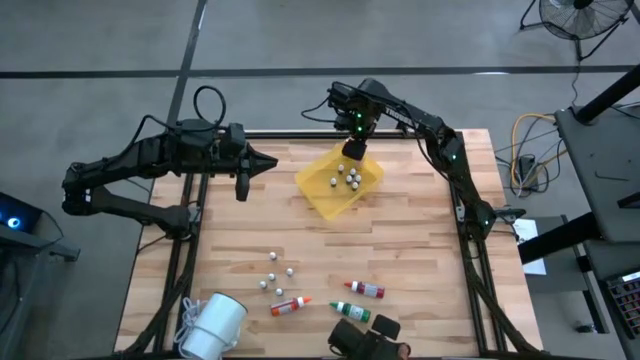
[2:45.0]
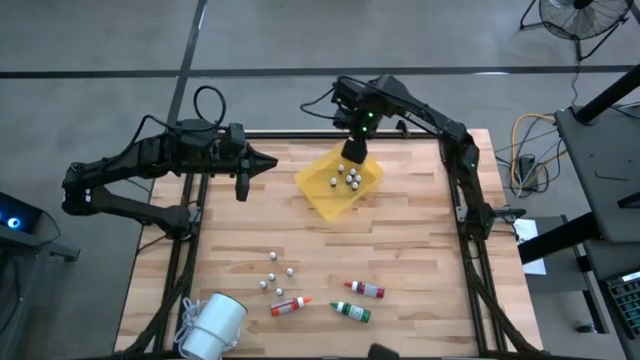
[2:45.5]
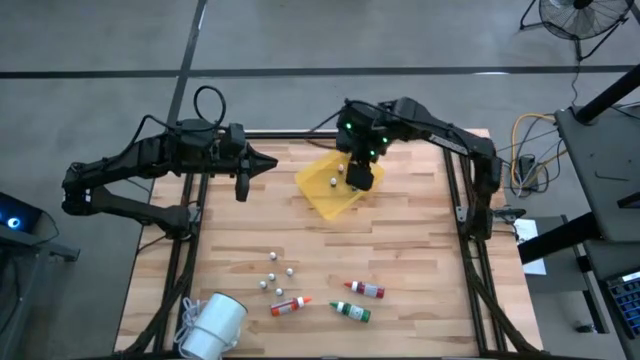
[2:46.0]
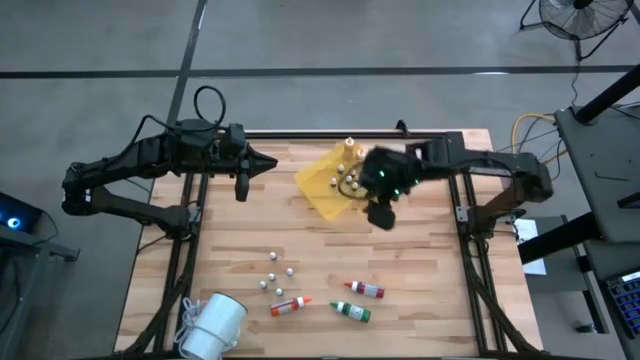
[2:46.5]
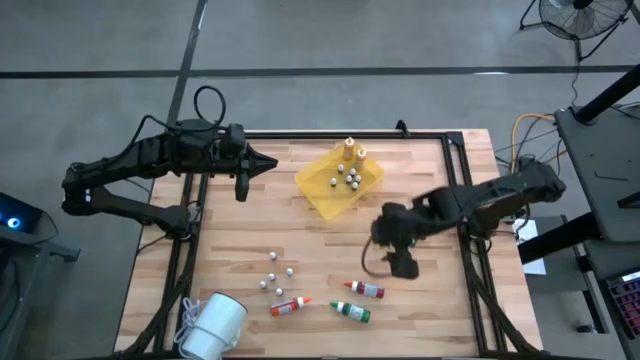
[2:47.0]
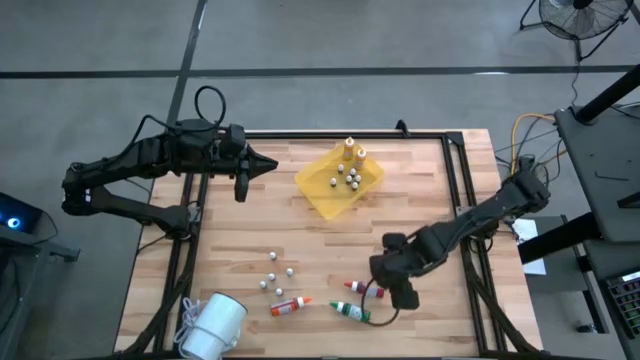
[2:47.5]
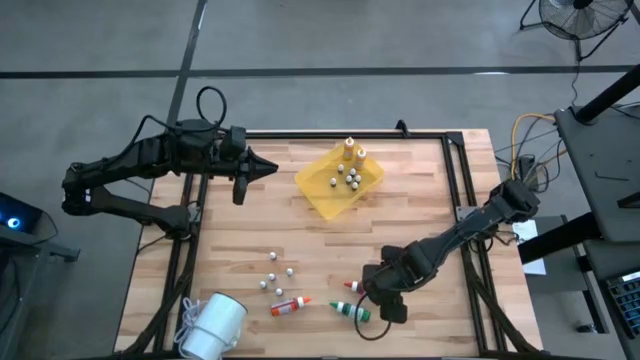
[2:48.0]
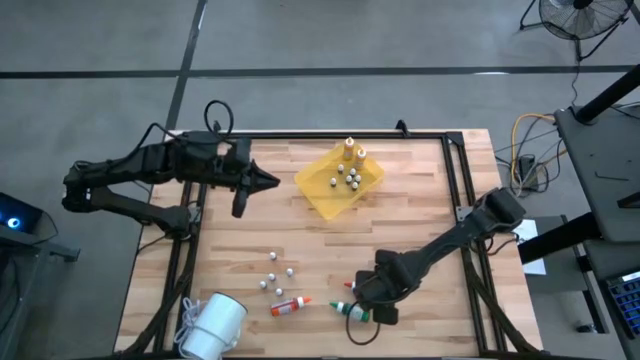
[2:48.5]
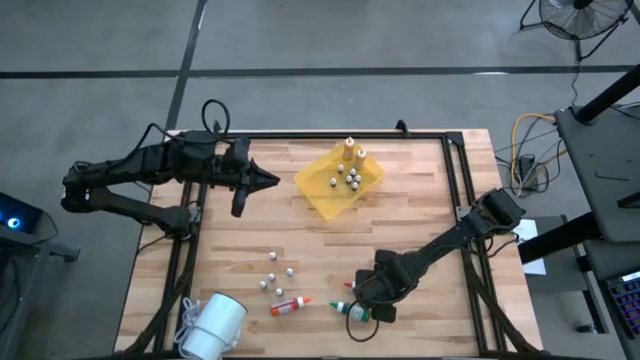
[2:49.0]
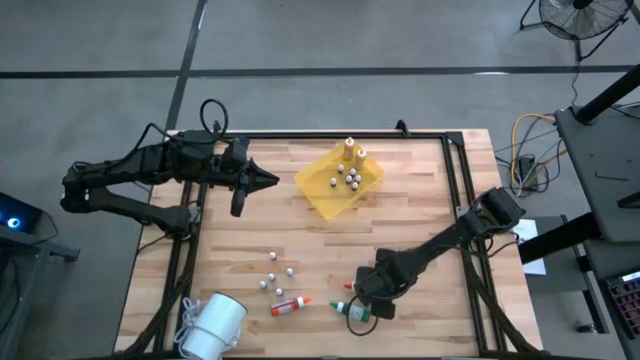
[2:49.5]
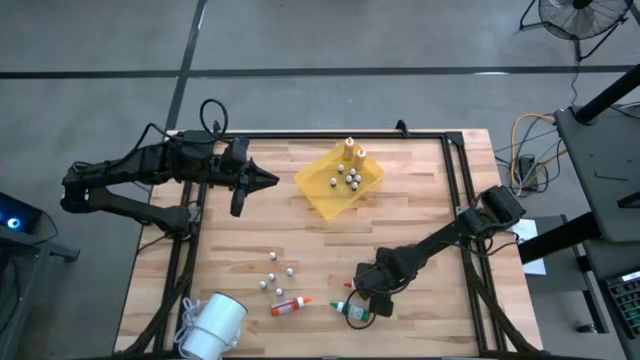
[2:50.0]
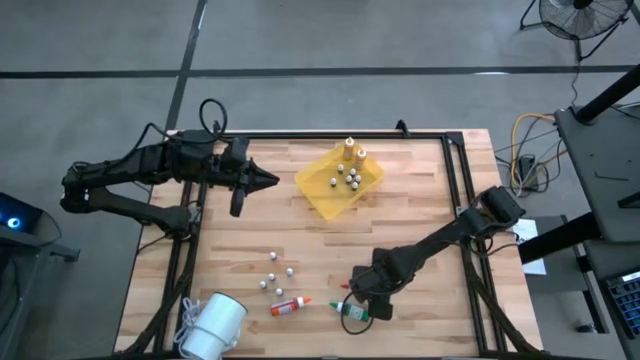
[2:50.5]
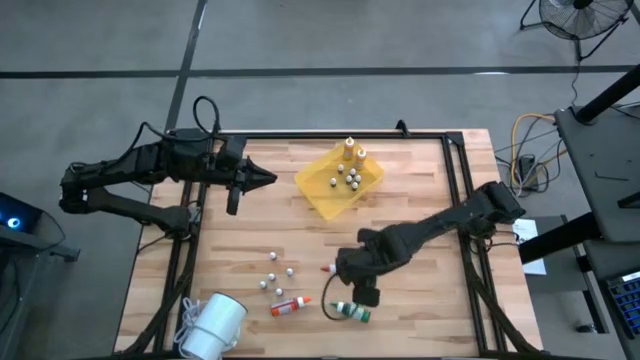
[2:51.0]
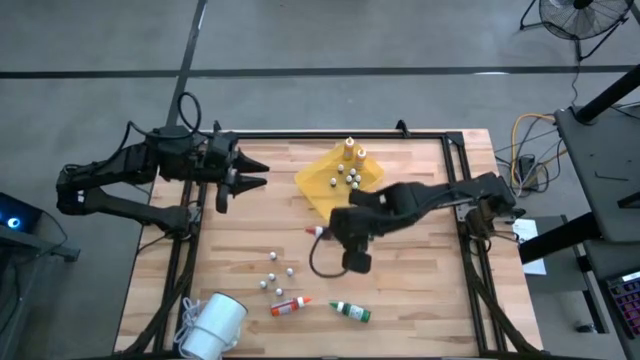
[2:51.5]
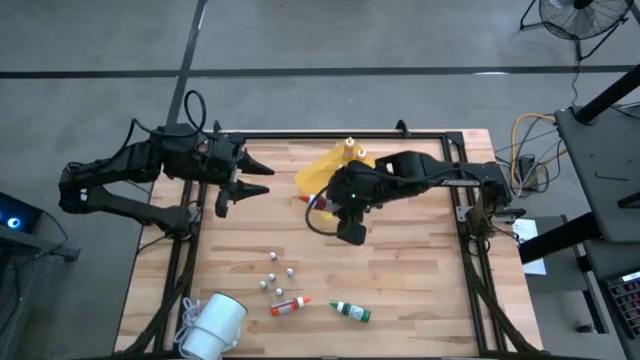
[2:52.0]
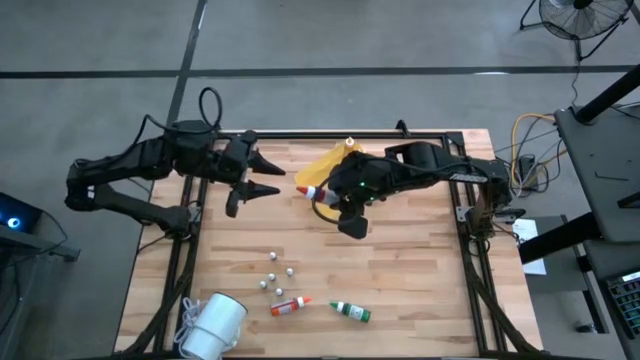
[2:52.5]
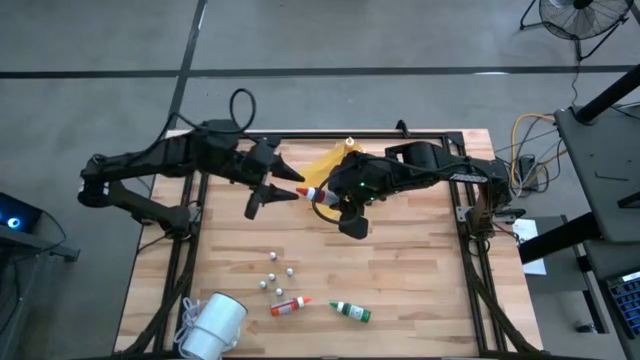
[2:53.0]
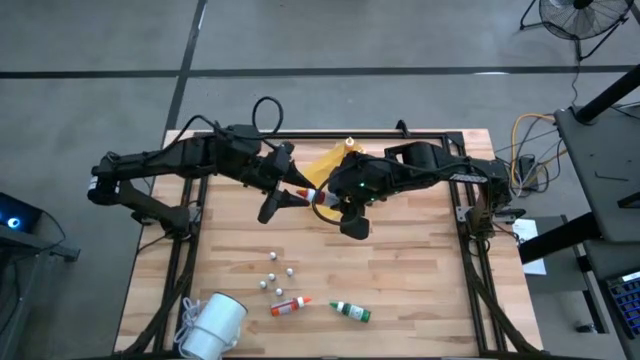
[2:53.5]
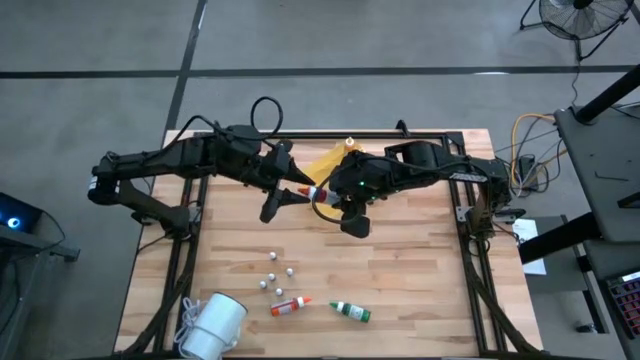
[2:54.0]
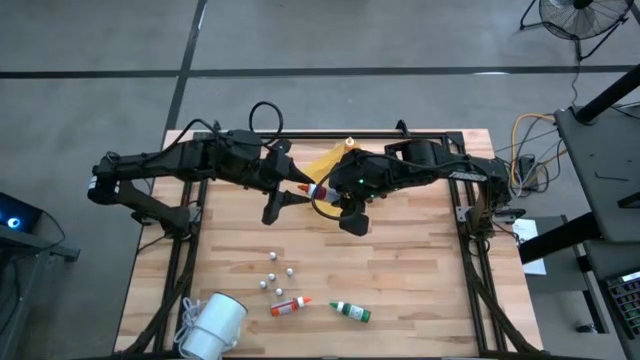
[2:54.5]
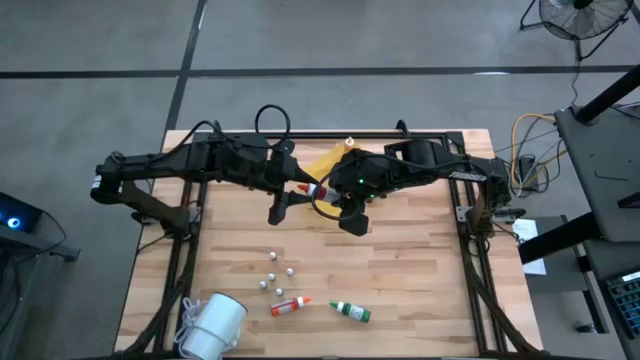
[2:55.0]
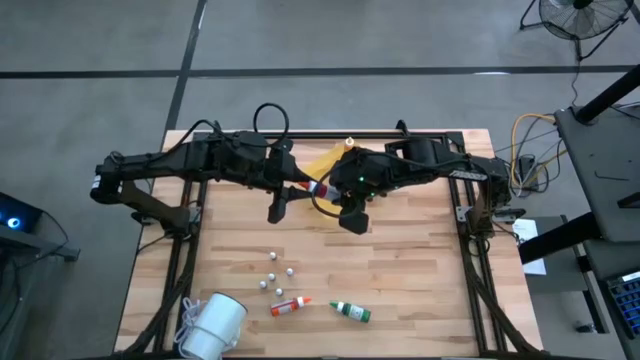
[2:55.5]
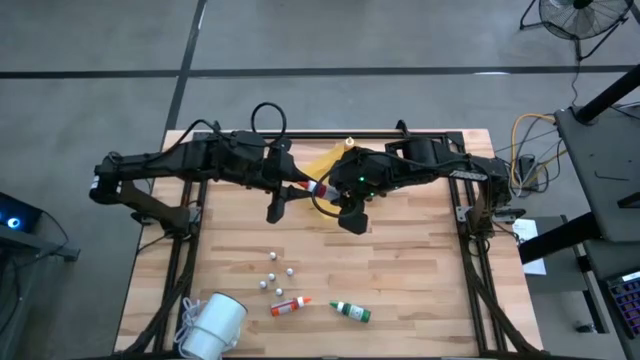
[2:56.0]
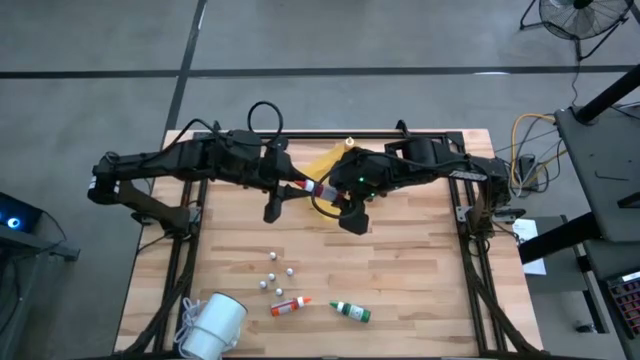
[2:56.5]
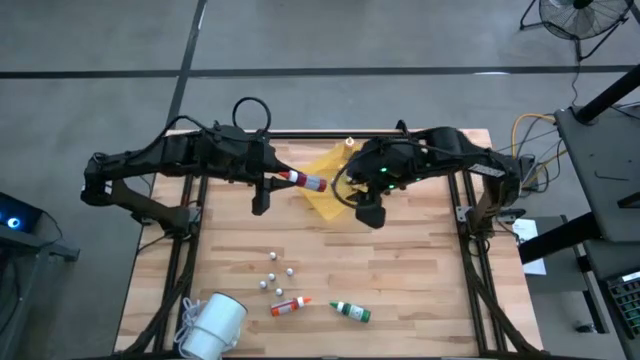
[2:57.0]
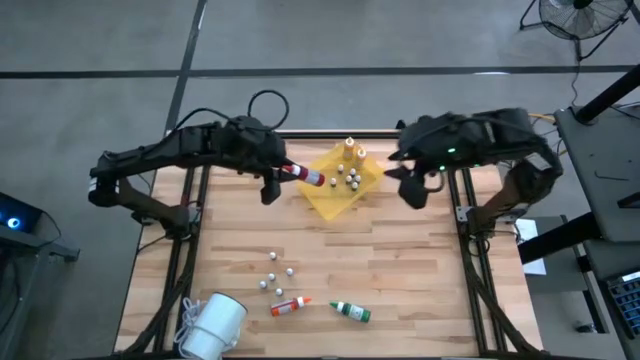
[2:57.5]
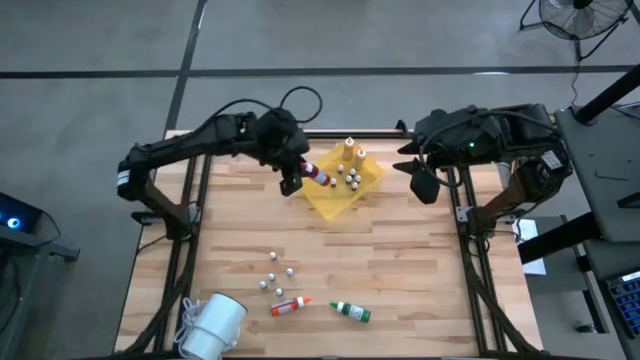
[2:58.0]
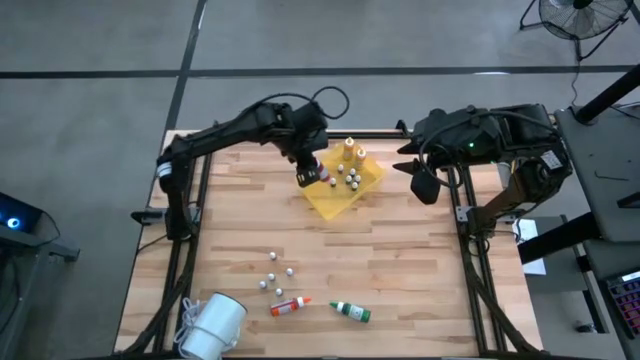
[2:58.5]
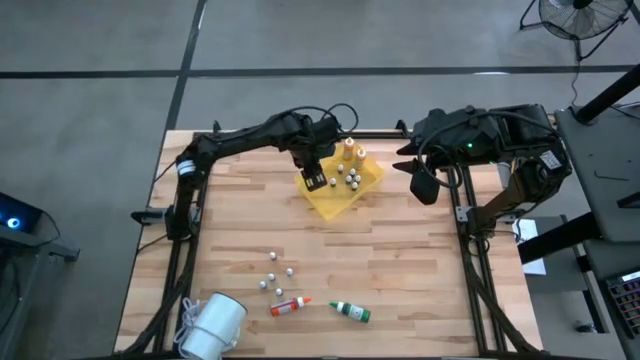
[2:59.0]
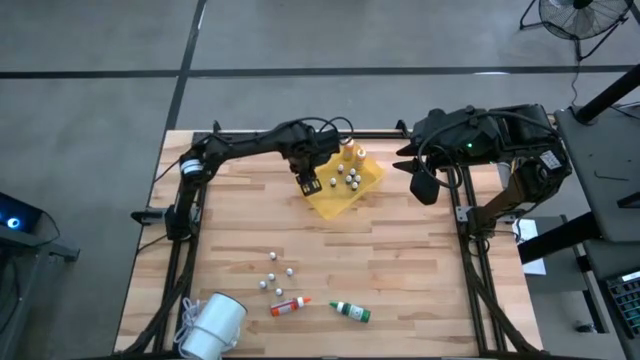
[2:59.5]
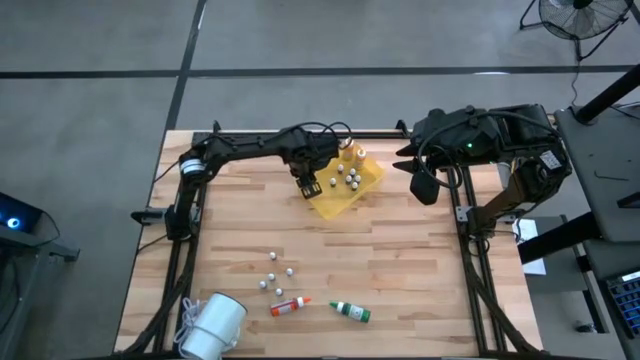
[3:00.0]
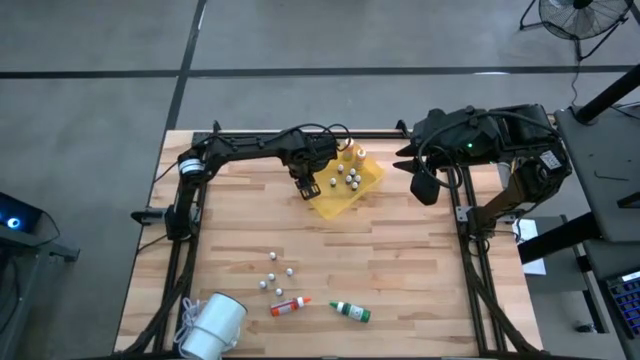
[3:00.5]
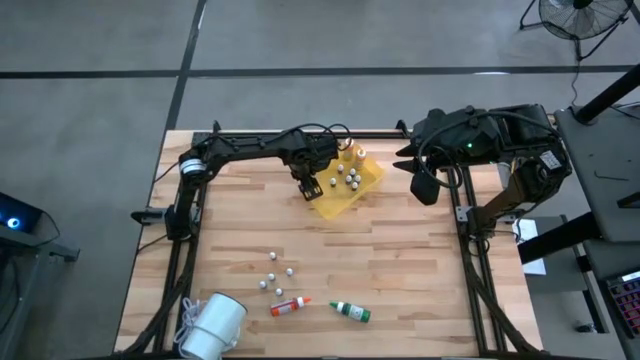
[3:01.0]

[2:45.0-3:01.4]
Task: Pick & Place food coloring
Put the large red food coloring bottle into the yellow bin
